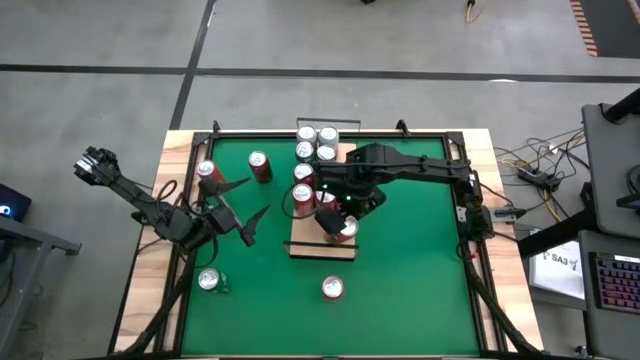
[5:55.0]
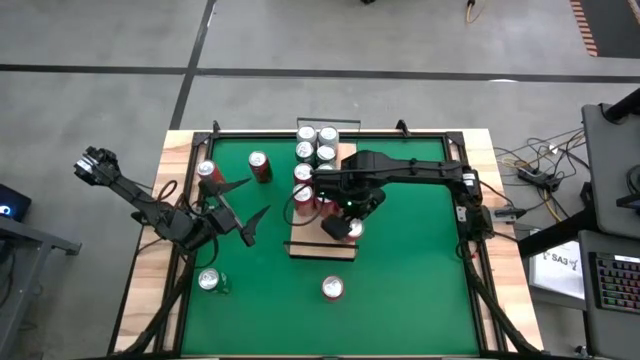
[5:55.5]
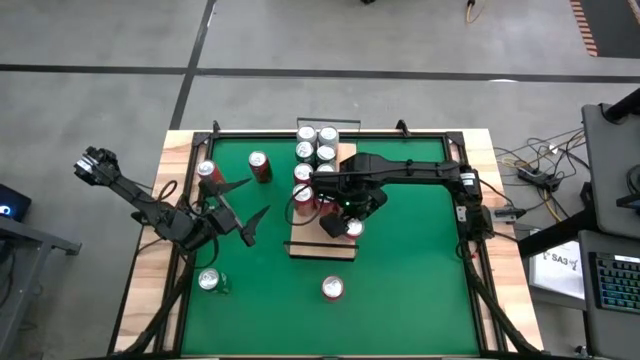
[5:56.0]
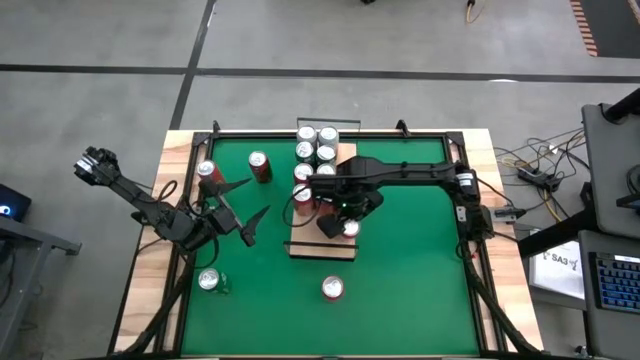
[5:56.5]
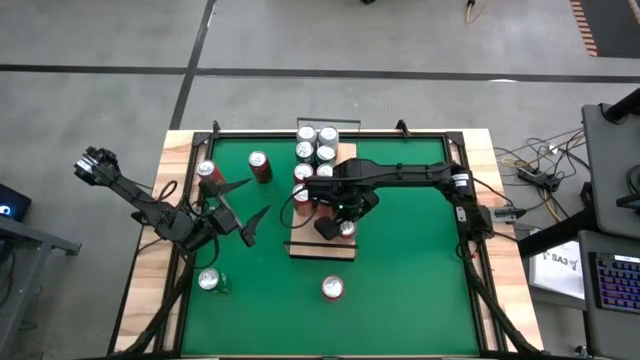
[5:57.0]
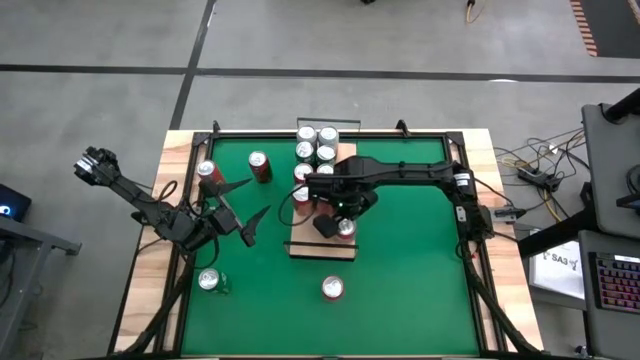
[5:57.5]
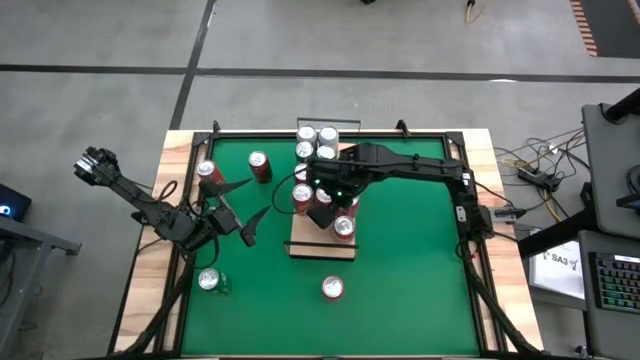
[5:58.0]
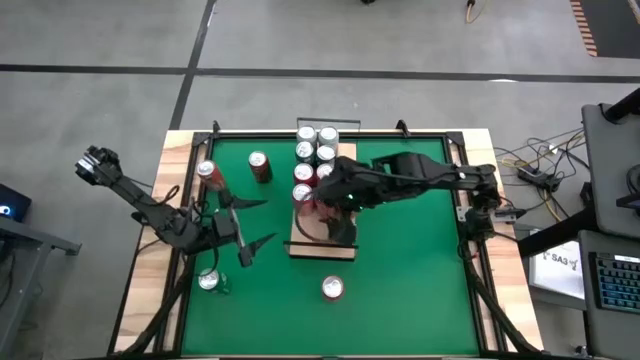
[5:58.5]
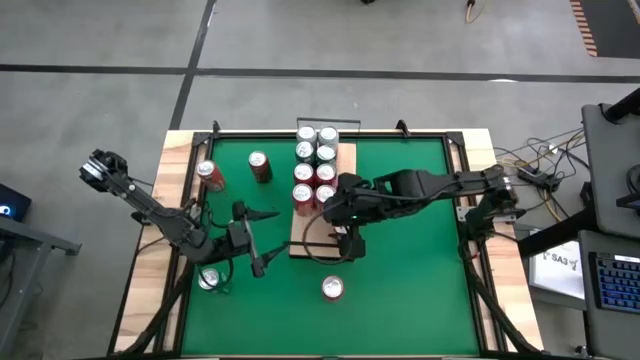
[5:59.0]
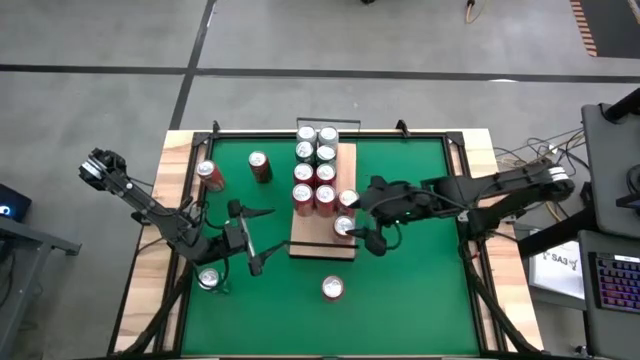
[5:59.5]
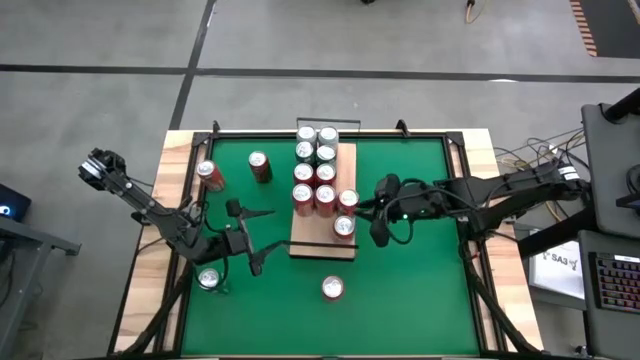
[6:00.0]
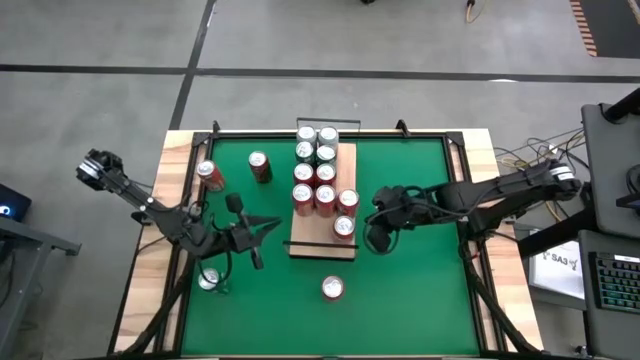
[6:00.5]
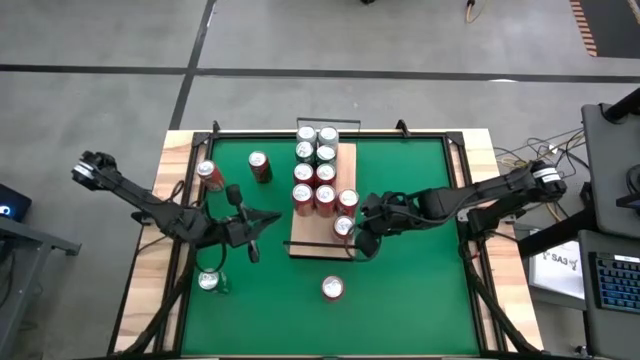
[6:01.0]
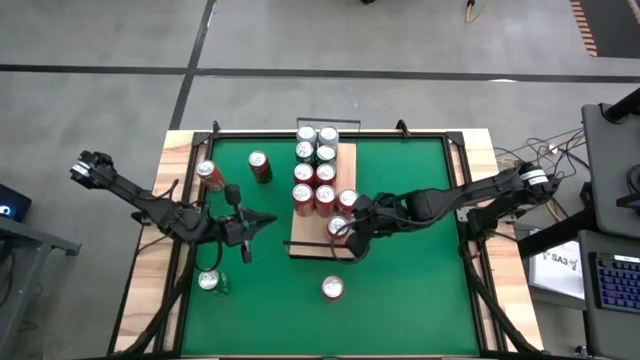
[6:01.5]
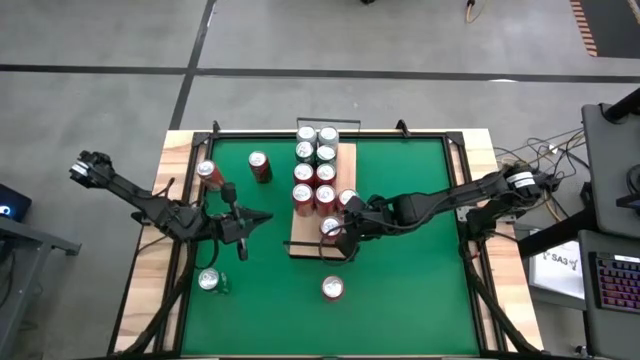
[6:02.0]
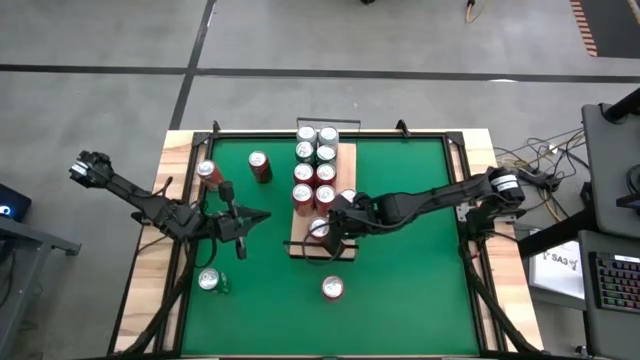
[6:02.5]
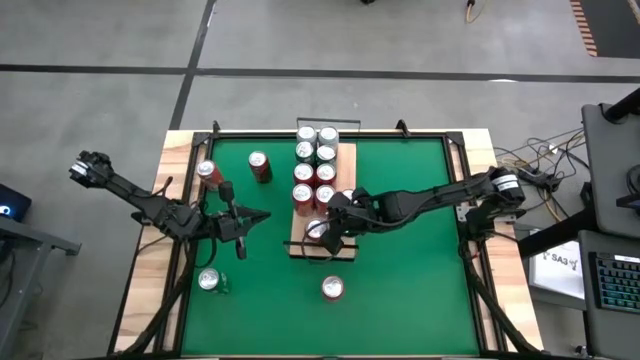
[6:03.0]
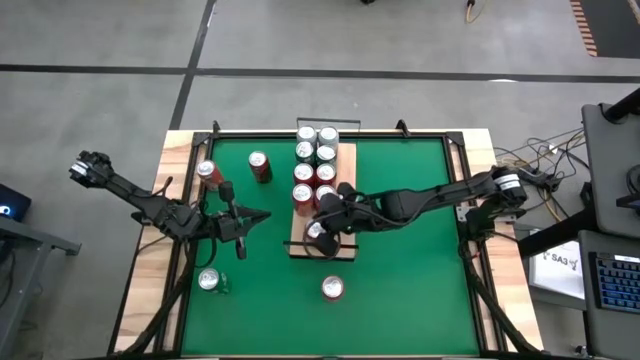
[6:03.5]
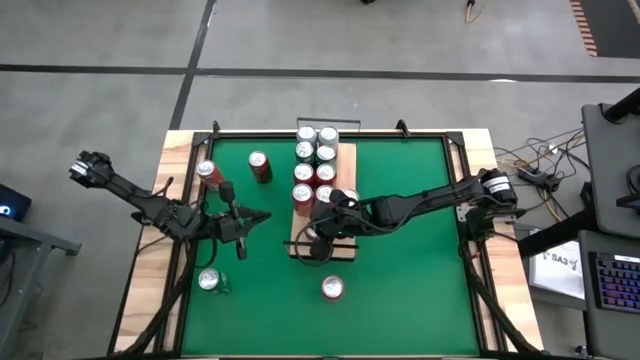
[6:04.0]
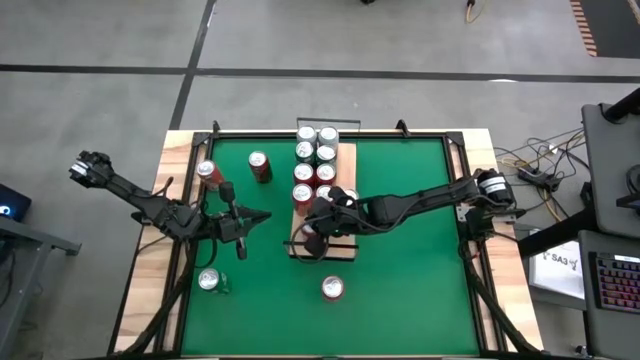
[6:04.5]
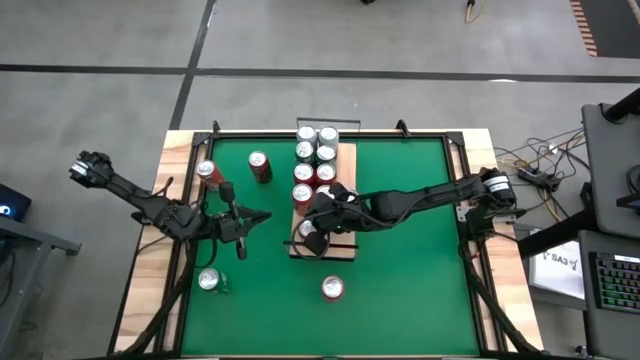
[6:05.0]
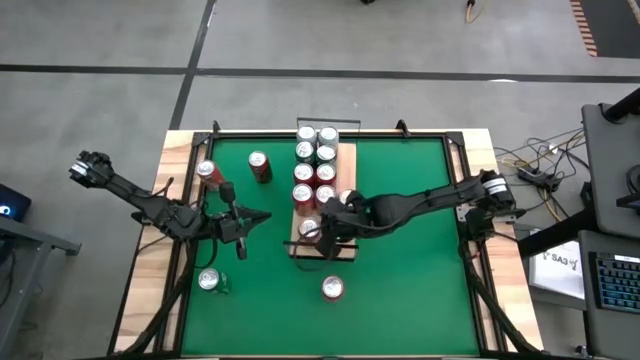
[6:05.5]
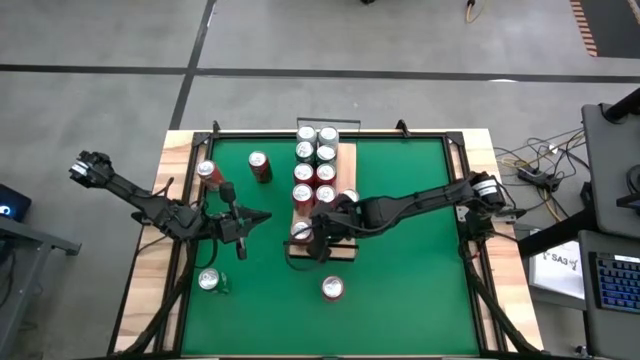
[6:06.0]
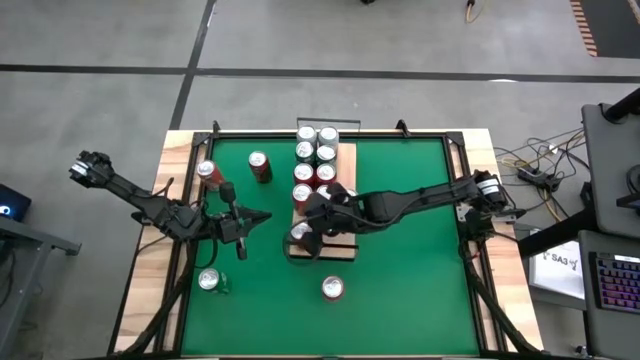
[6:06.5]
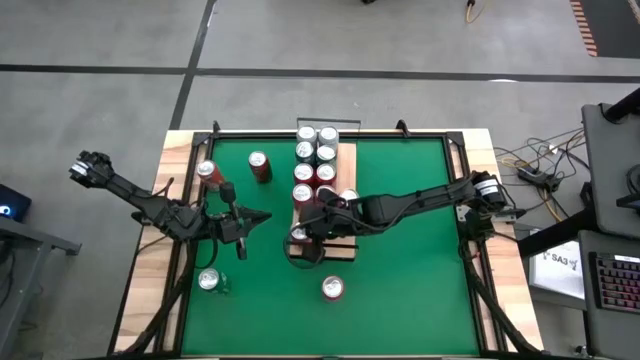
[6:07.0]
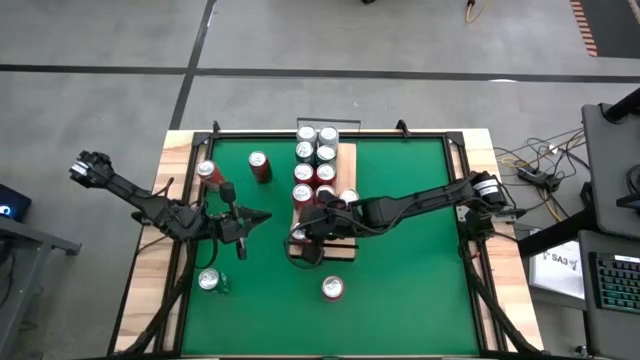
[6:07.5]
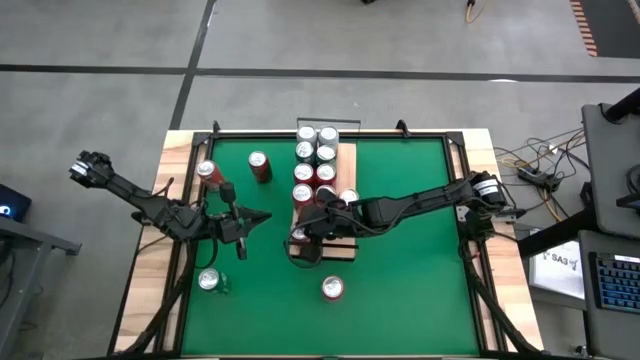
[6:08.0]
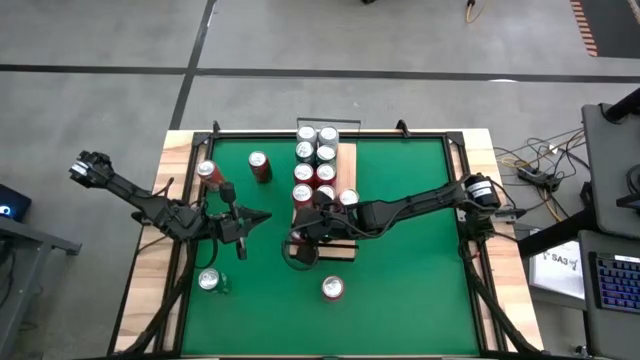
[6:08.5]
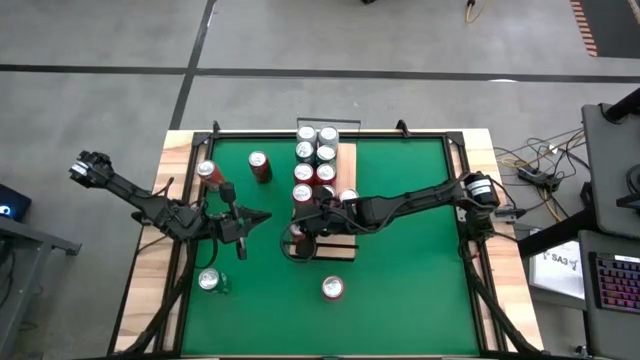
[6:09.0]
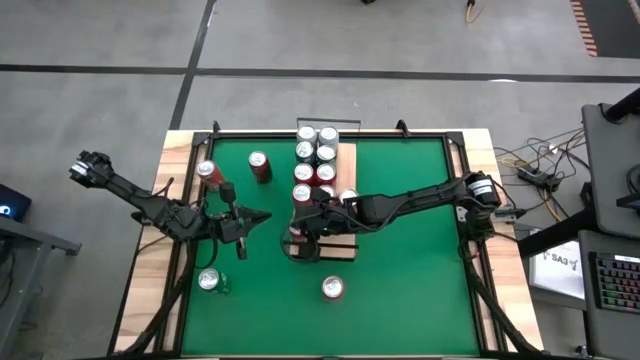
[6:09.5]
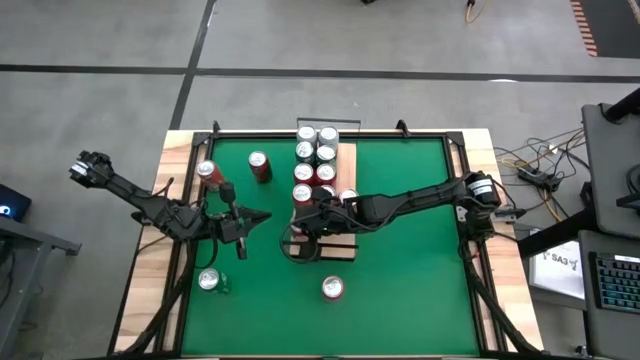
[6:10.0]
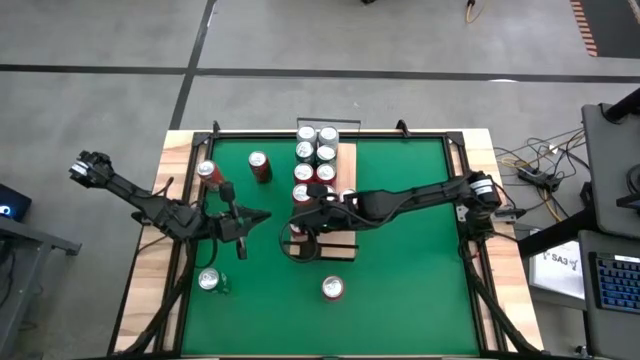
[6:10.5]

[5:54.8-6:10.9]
Task: Place canned beverage on shelf
Put the orange soda can on the shelf and aligned with the other orange soda can

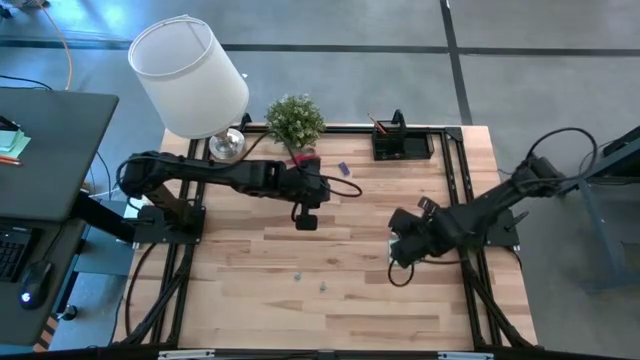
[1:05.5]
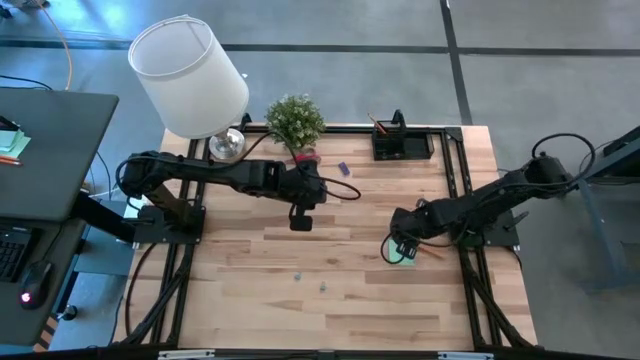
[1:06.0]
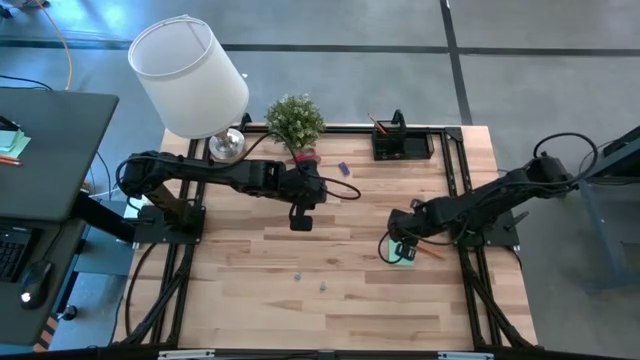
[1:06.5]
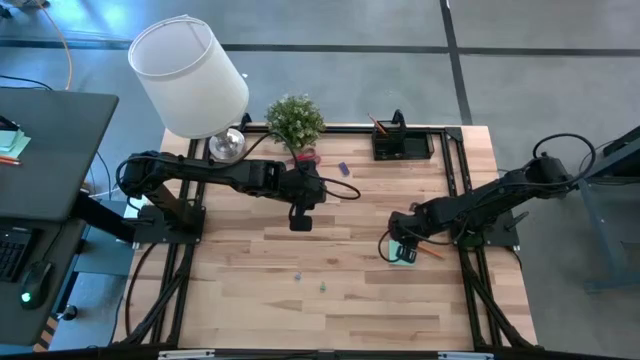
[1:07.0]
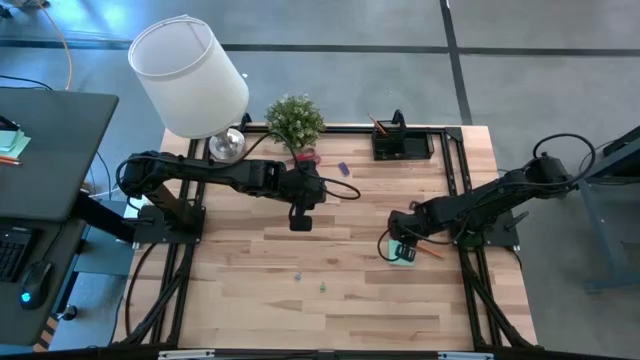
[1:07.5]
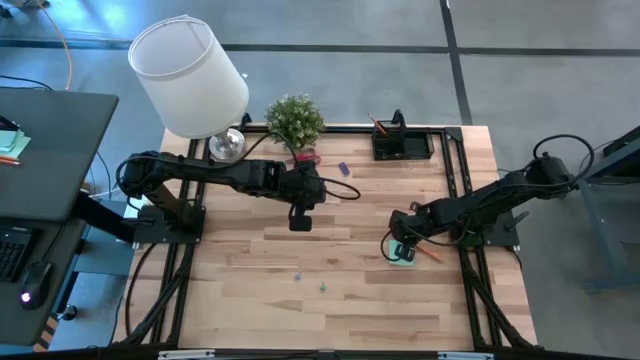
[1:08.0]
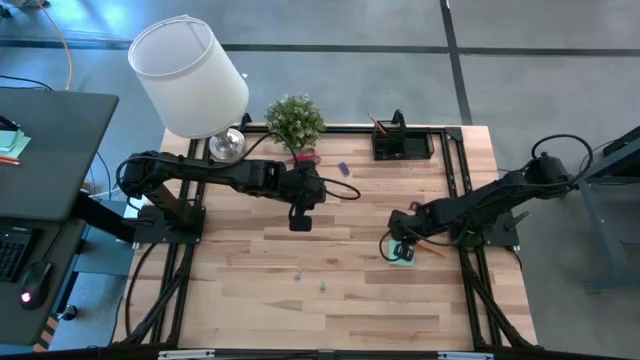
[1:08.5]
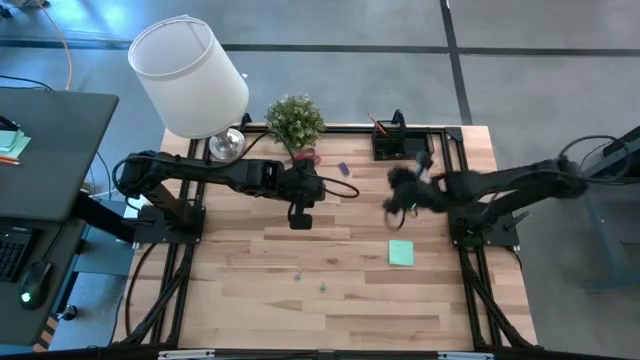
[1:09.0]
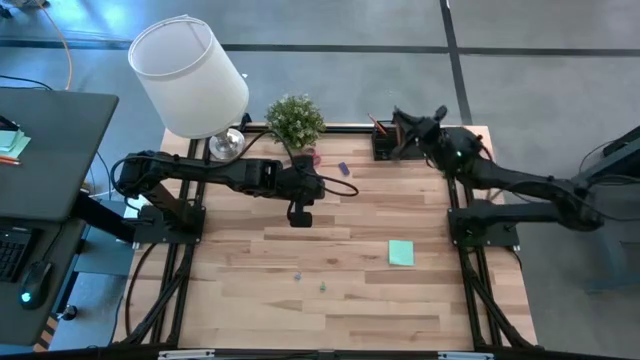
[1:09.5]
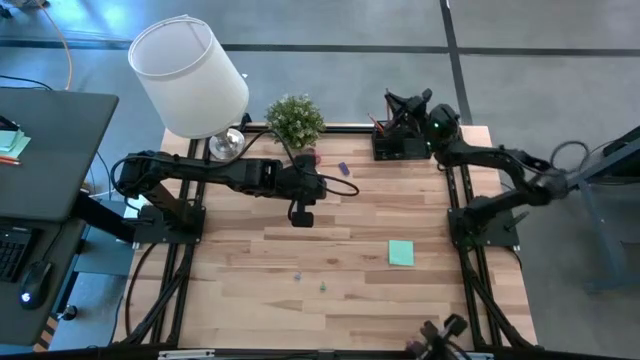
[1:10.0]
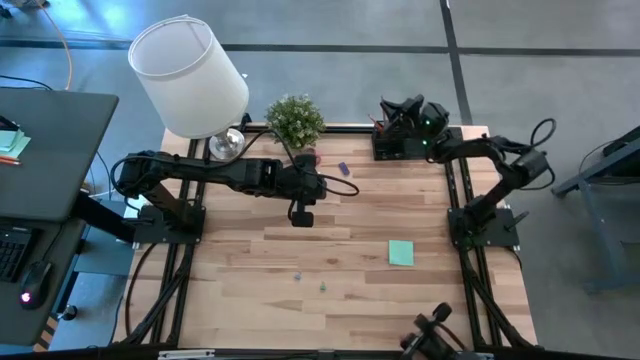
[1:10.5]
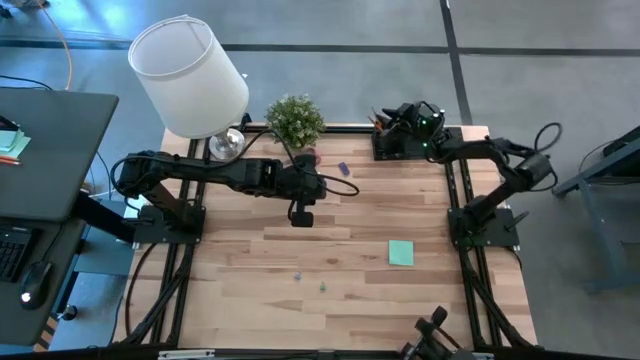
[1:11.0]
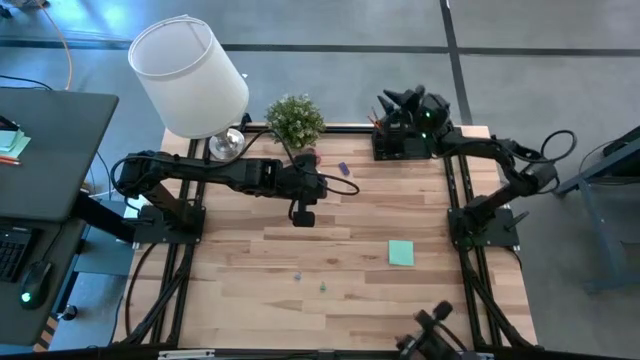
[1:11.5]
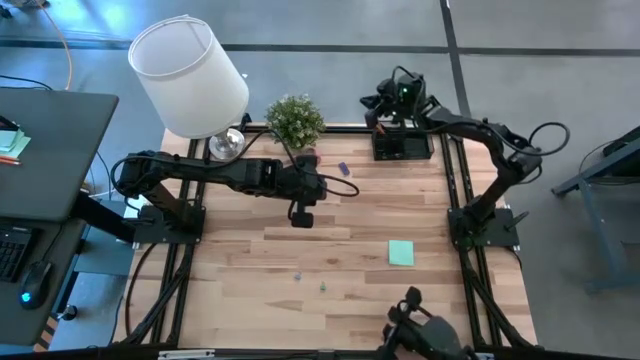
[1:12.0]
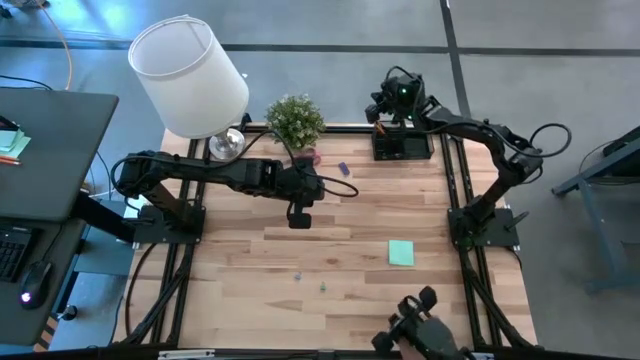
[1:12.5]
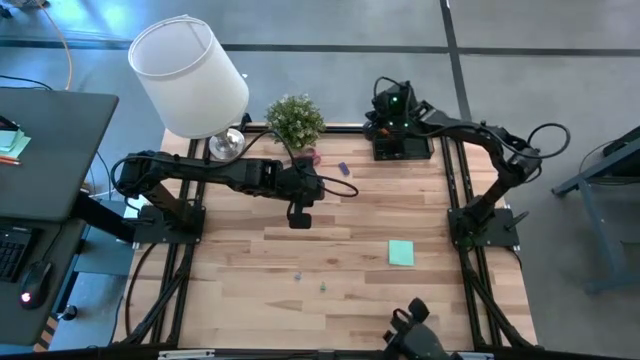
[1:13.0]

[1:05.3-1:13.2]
Task: Pick and place office supplies into organizer
Put the orange pencil in the black desk organizer
